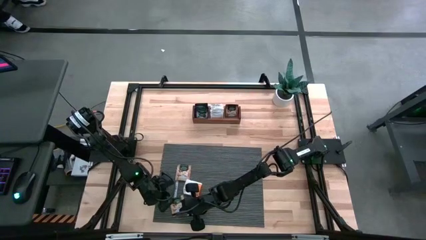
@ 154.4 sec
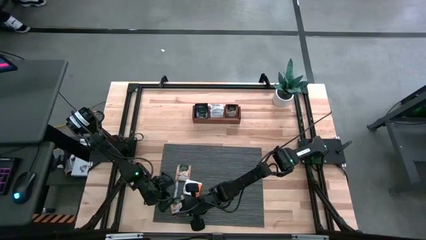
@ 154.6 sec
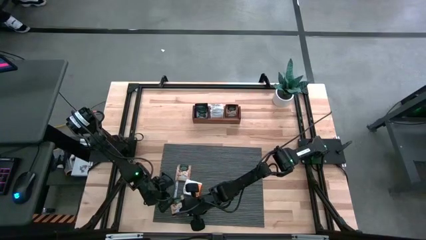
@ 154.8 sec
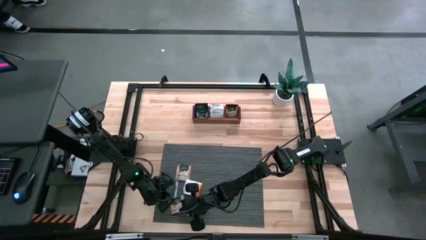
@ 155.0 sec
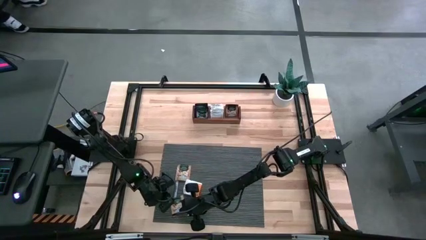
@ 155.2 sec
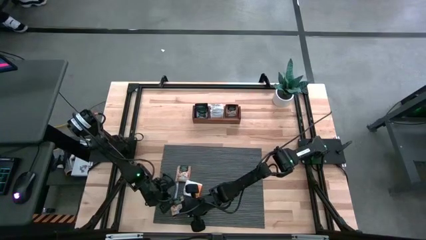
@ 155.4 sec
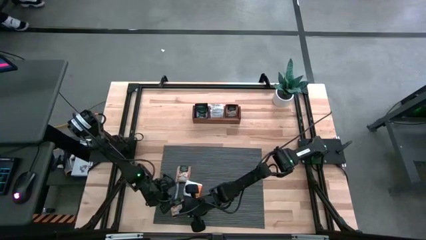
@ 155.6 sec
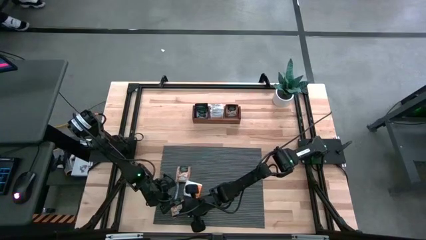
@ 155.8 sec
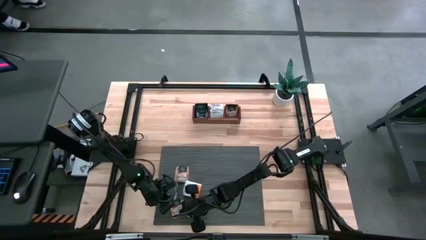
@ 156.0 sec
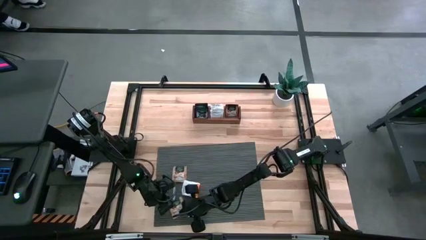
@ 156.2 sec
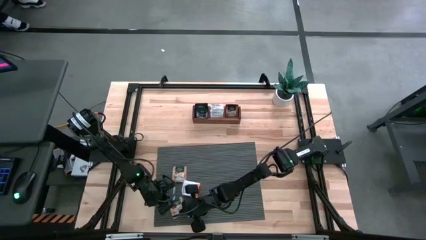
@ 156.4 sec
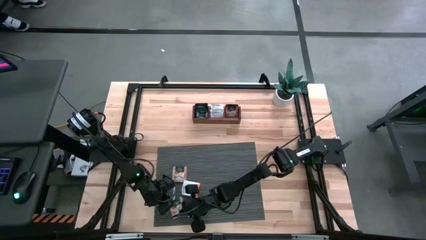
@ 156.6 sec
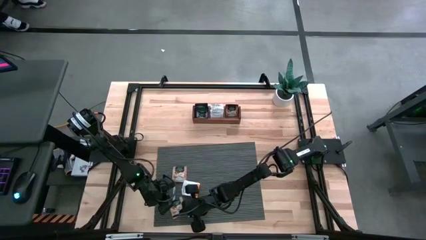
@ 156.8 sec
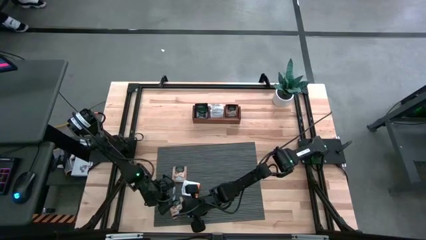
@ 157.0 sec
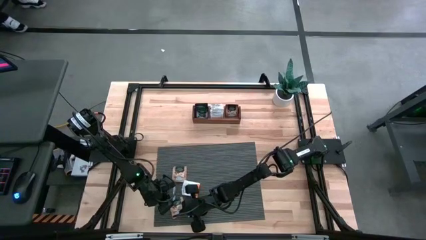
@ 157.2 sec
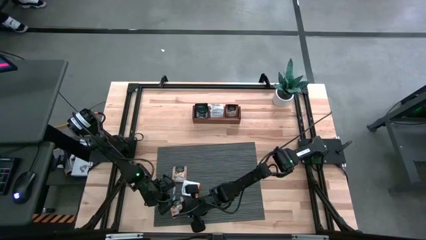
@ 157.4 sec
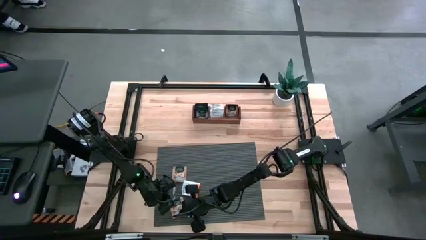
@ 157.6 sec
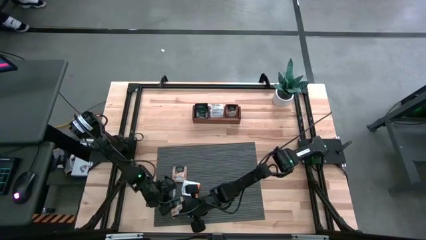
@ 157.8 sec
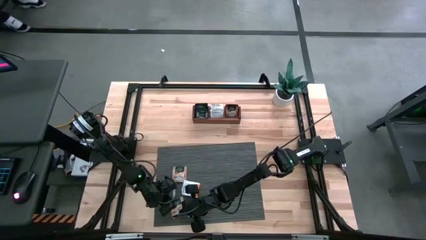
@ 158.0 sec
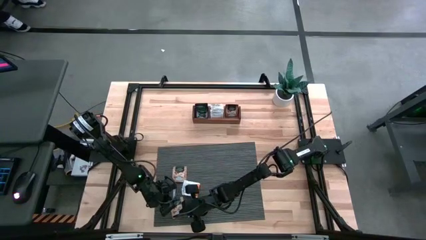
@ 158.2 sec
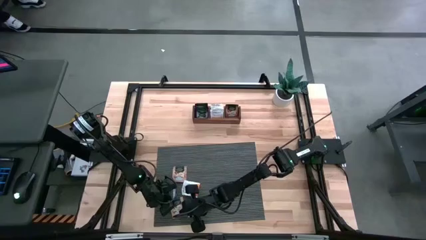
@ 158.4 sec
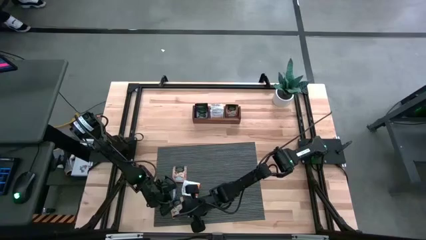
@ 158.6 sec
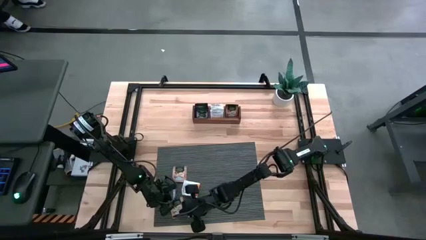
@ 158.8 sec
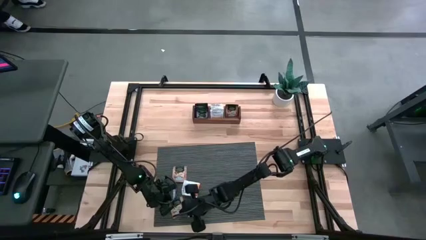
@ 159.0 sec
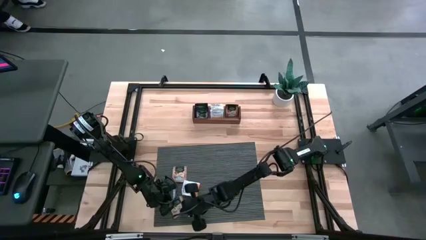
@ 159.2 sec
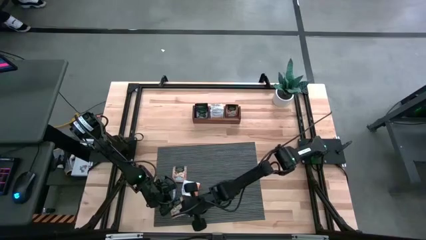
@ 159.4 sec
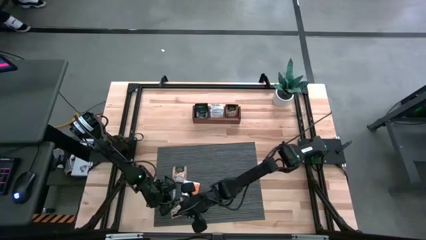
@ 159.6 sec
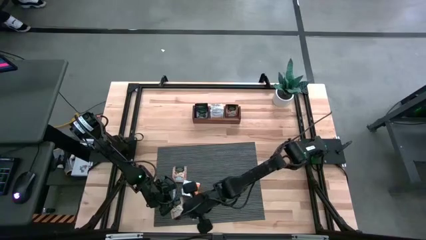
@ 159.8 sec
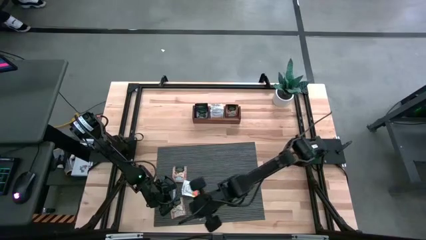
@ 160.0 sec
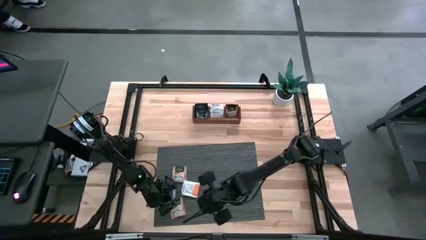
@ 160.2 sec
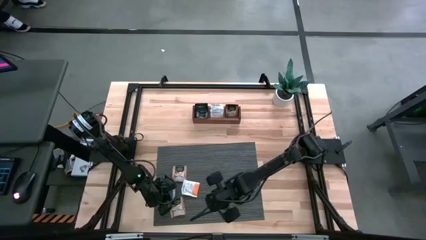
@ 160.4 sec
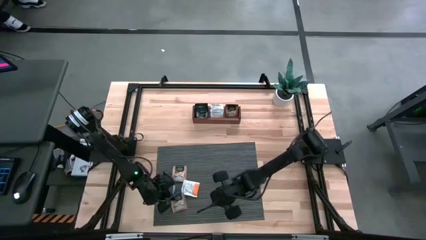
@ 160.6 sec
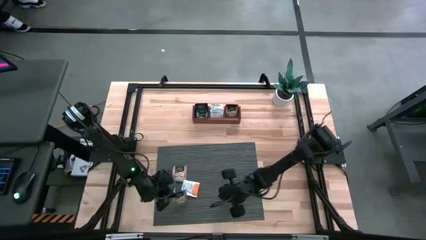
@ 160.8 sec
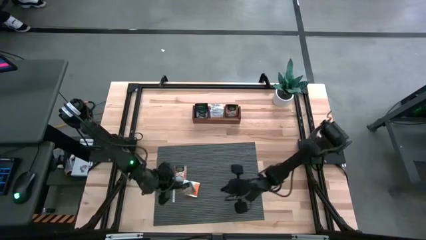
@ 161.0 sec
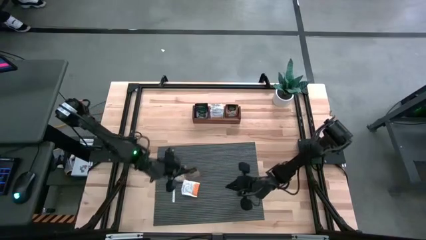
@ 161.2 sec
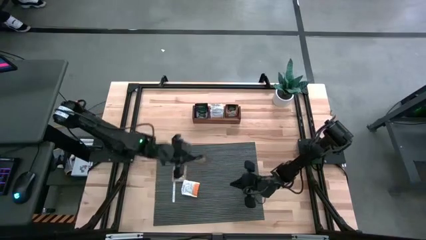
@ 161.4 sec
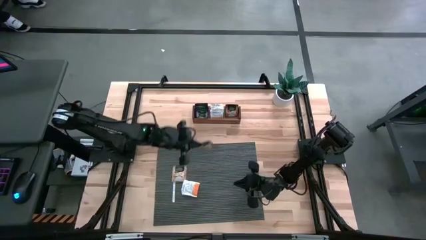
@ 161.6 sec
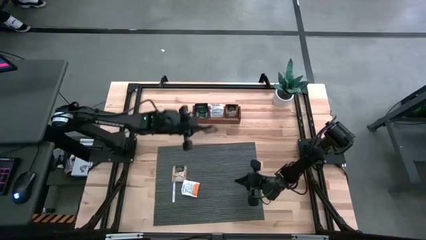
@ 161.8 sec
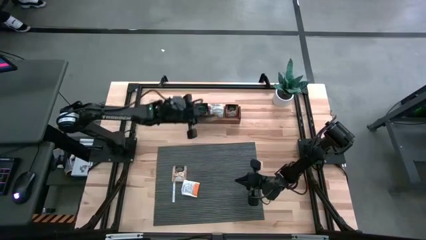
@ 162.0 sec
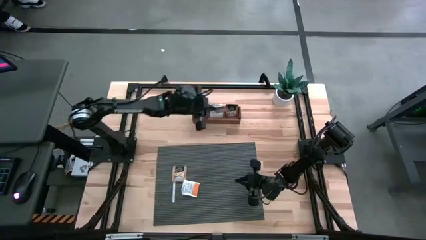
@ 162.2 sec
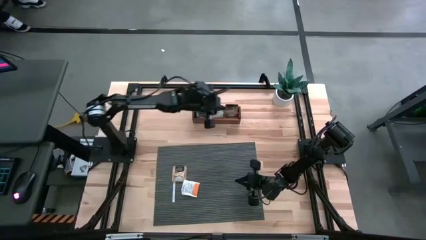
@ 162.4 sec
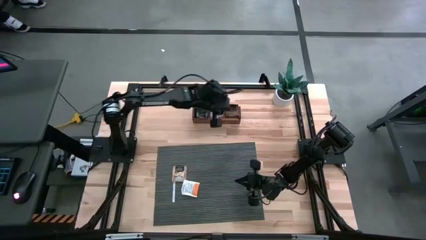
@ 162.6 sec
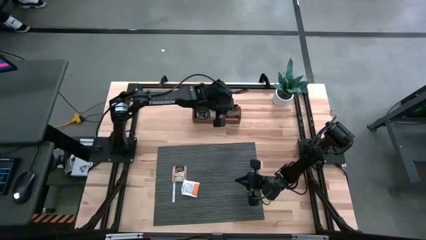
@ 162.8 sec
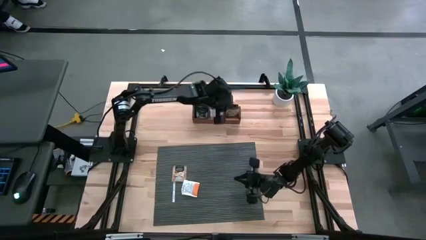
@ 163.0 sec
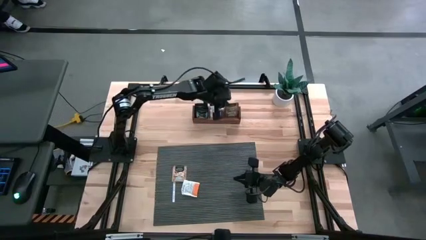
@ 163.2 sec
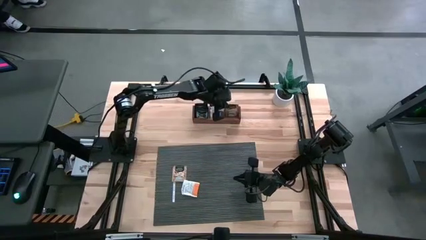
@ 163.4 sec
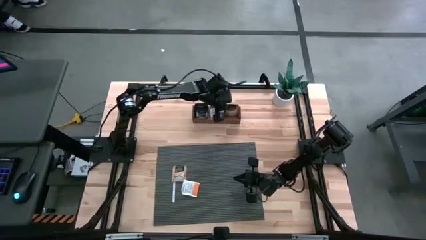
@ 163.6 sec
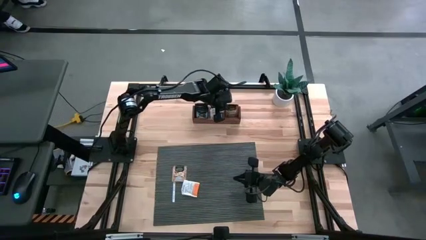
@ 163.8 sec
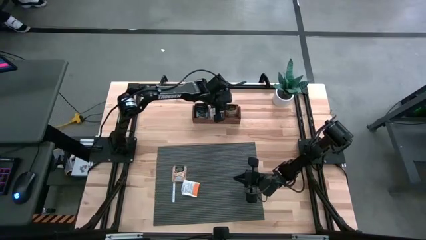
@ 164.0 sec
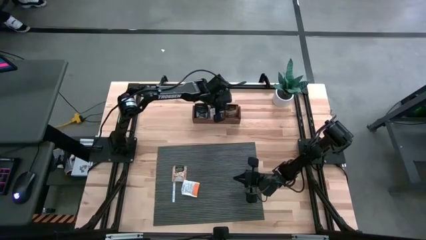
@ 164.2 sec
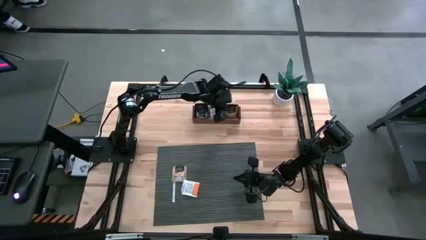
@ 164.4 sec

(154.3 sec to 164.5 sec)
Task: Pick & Place Tea
Put the light brown tea bag into the right compartment of the wooden organizer

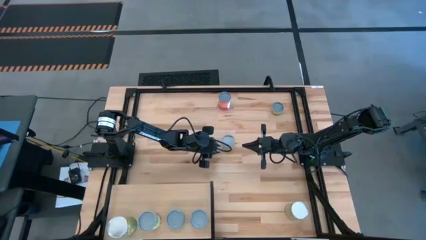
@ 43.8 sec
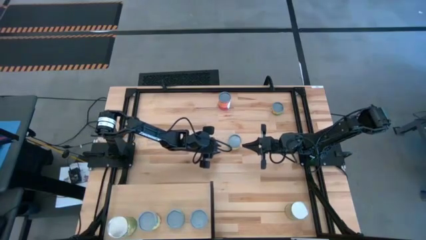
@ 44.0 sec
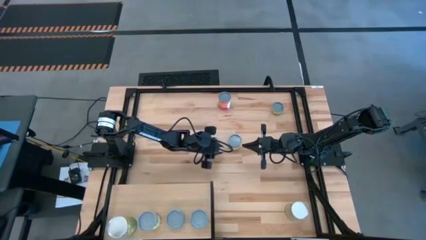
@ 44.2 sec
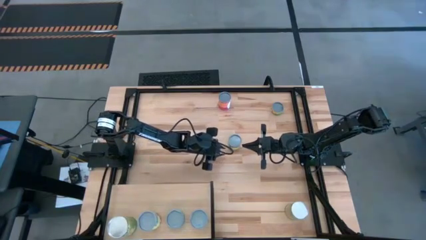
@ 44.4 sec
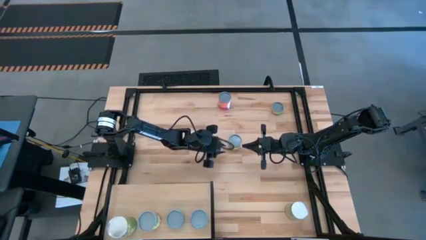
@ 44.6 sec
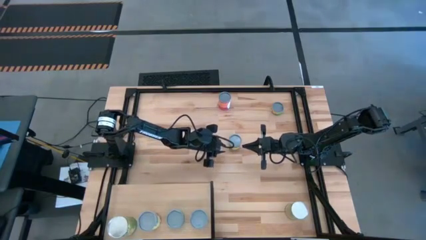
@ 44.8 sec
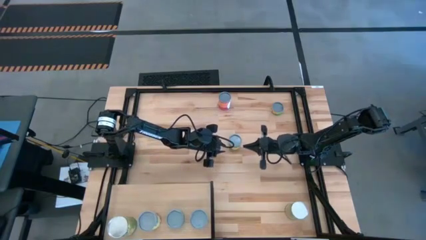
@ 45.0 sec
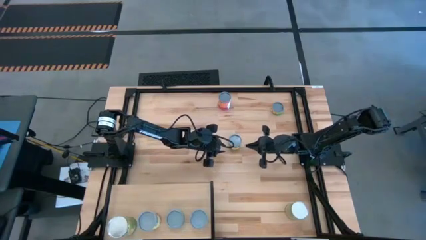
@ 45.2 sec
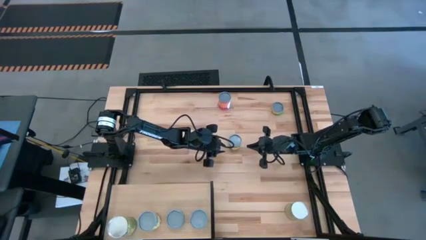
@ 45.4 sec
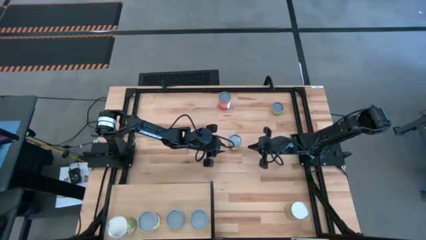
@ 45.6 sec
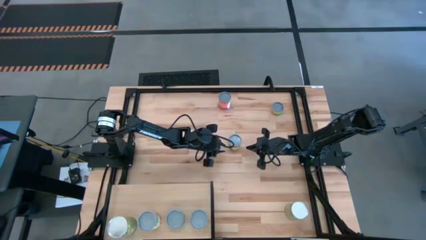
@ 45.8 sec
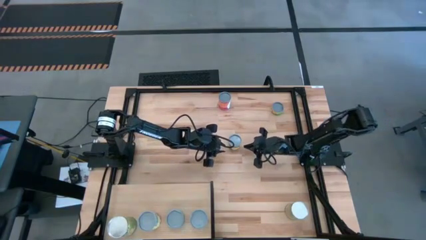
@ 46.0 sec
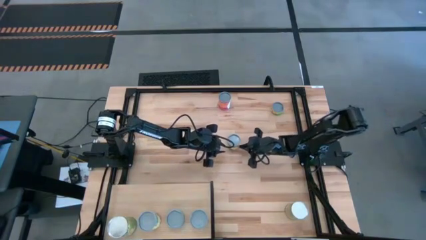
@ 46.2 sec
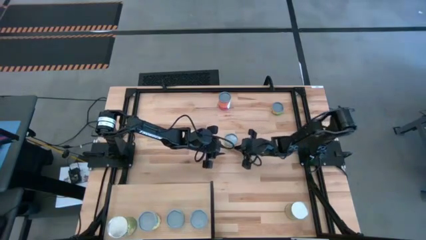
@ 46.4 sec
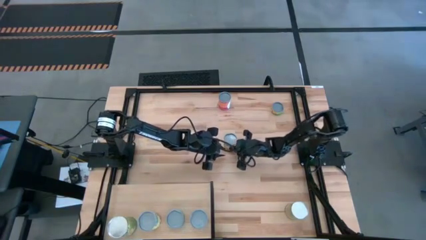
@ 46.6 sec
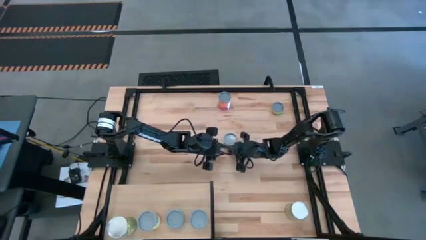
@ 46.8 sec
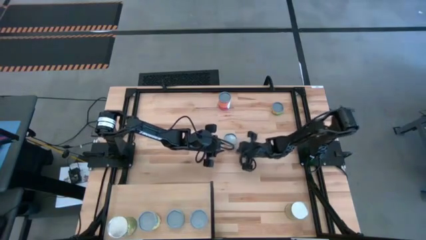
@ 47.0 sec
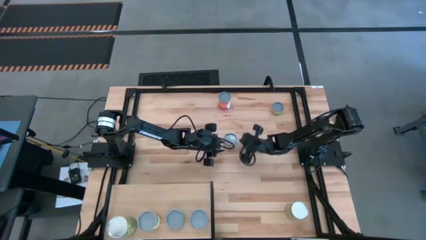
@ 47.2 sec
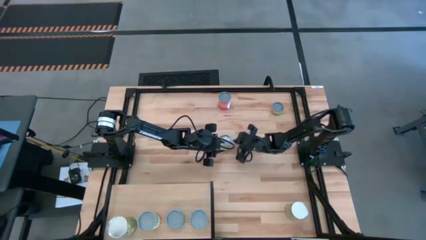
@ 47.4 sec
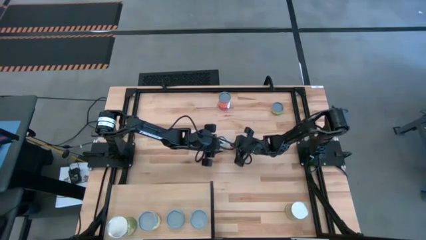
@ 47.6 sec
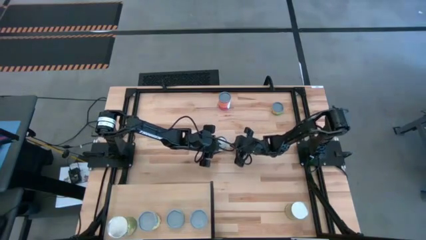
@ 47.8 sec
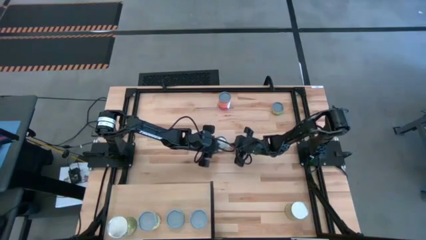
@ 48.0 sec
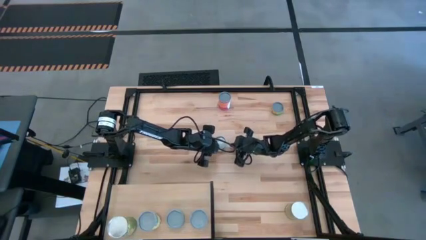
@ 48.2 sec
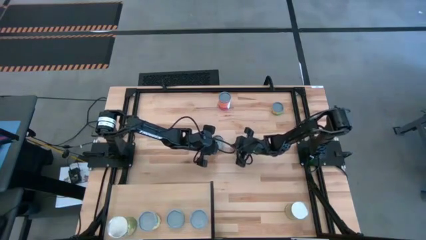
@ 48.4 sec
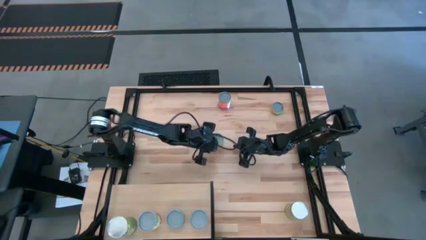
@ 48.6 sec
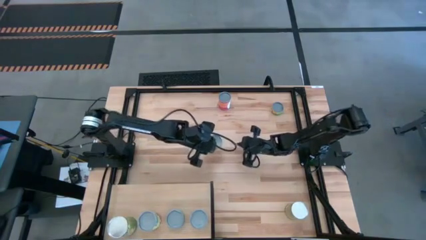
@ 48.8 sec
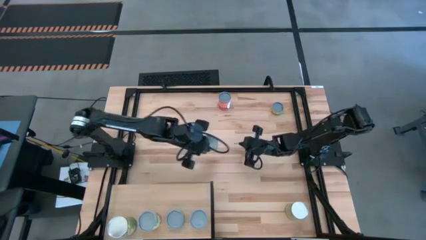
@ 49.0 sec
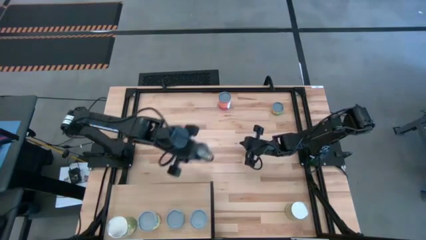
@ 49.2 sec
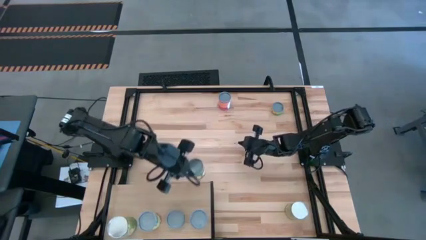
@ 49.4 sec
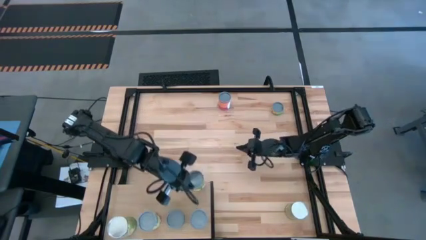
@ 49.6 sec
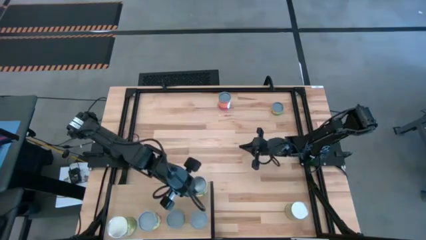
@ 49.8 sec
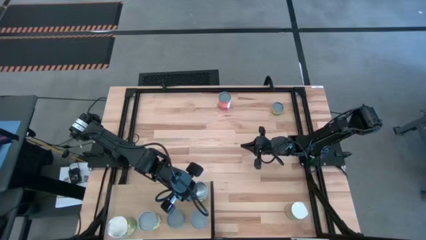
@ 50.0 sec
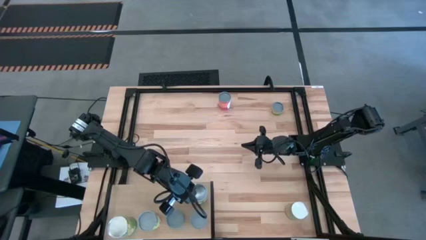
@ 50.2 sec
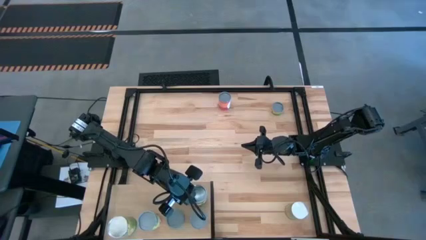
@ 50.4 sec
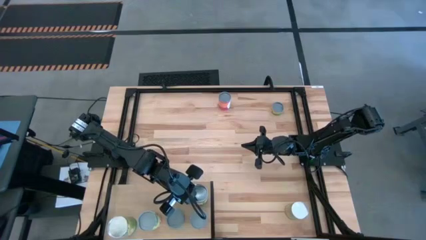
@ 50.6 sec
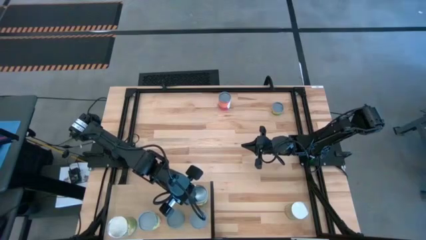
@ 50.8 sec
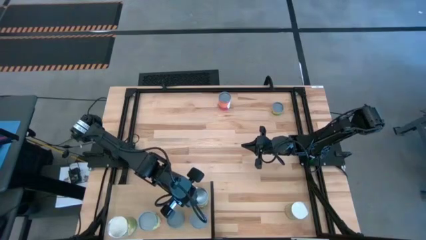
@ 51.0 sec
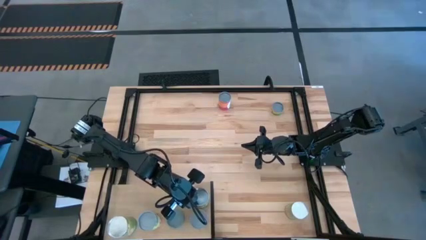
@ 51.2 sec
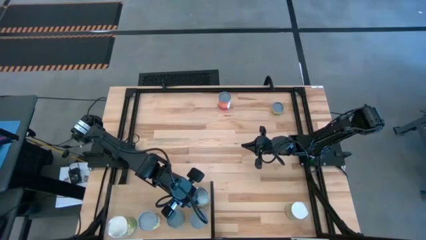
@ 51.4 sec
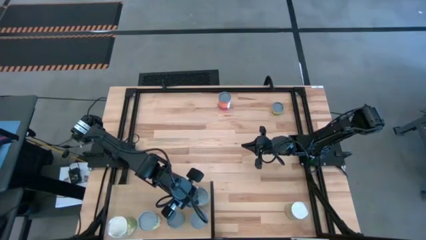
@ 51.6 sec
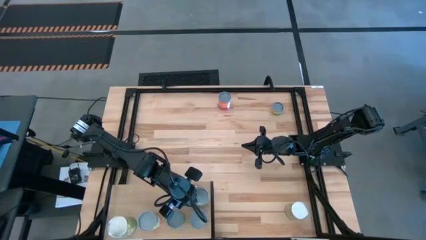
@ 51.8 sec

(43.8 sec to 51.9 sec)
Task: Pick and place cans onto a shelf
Put the canned peaches on the shelf
